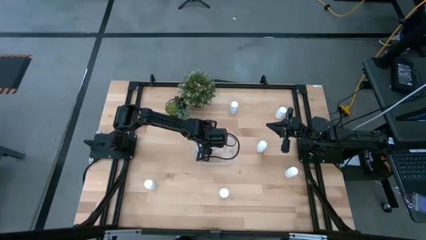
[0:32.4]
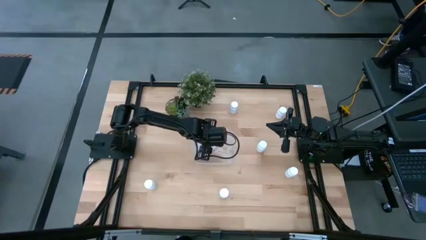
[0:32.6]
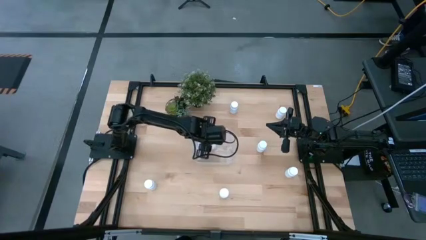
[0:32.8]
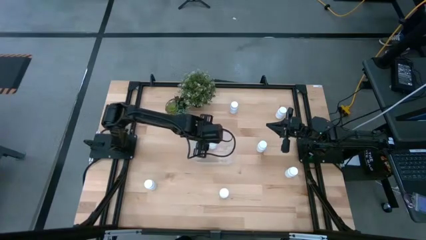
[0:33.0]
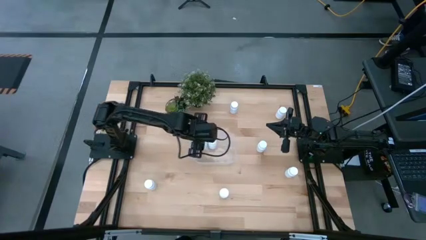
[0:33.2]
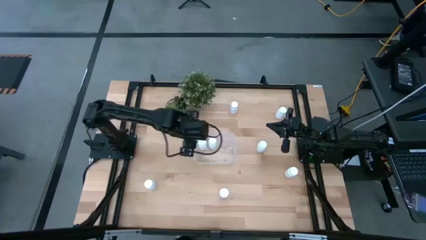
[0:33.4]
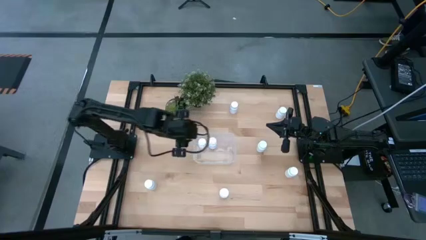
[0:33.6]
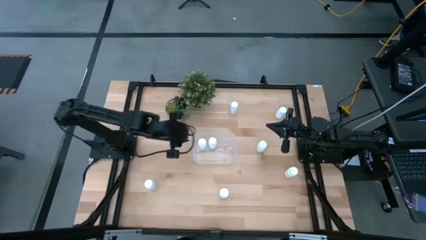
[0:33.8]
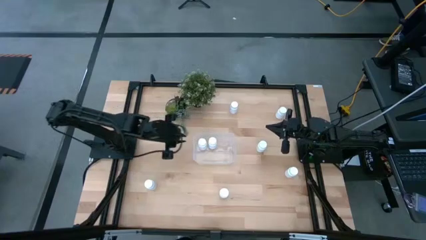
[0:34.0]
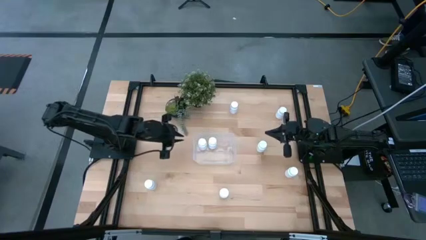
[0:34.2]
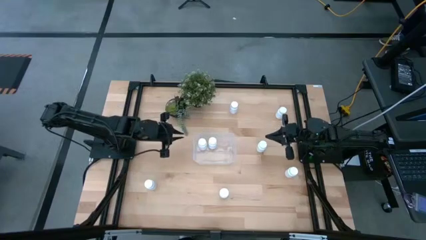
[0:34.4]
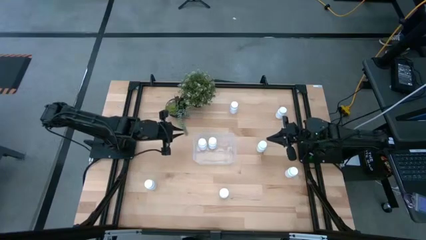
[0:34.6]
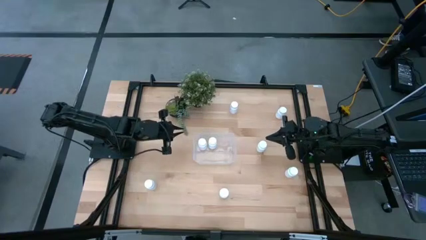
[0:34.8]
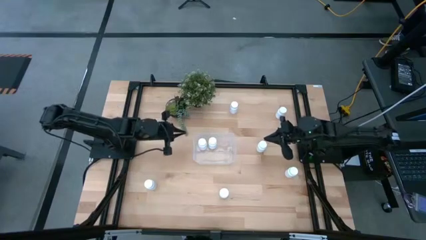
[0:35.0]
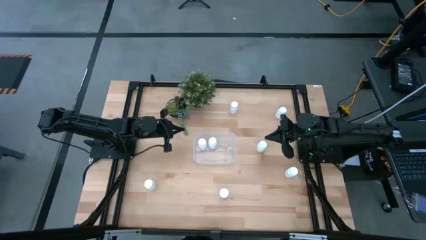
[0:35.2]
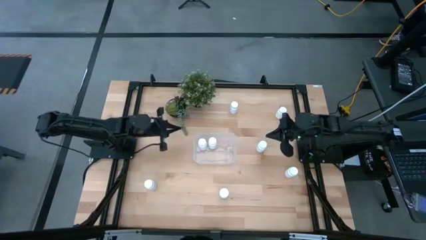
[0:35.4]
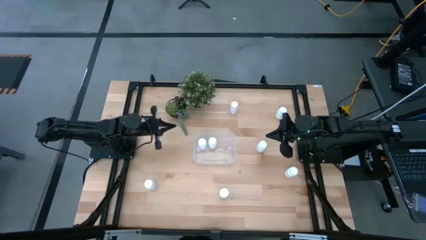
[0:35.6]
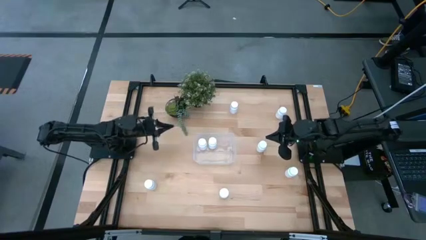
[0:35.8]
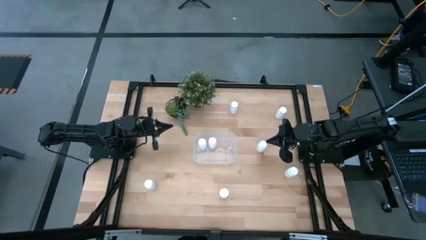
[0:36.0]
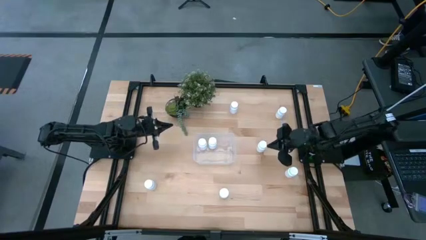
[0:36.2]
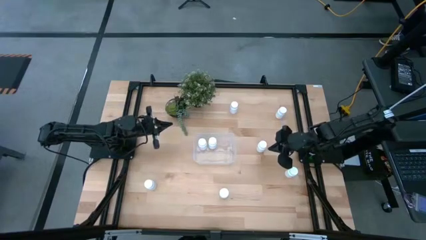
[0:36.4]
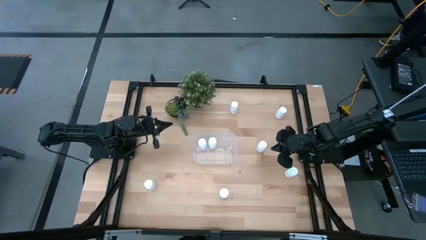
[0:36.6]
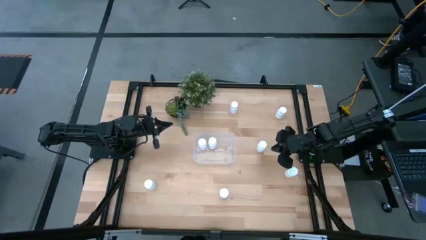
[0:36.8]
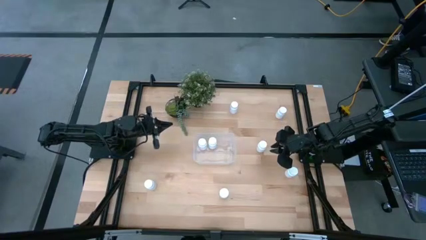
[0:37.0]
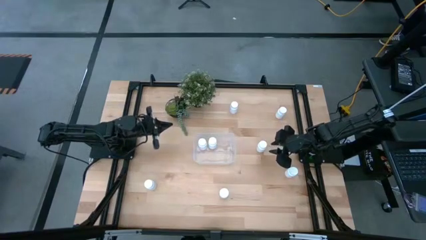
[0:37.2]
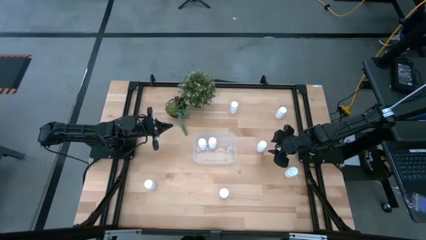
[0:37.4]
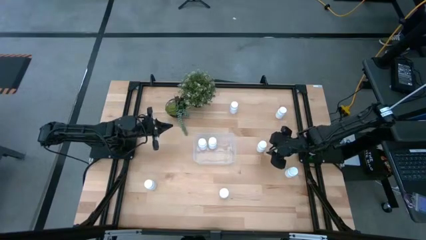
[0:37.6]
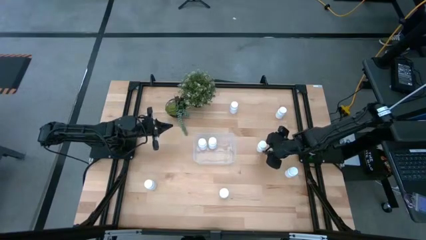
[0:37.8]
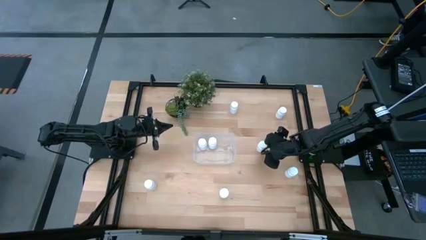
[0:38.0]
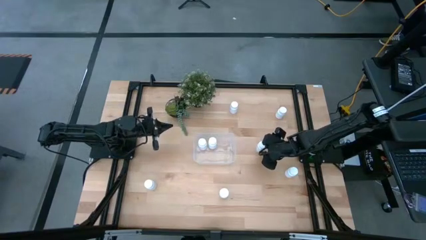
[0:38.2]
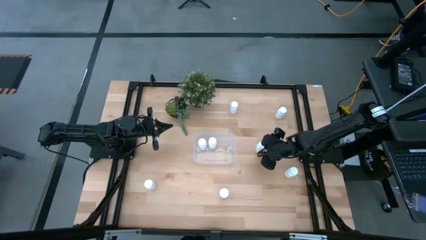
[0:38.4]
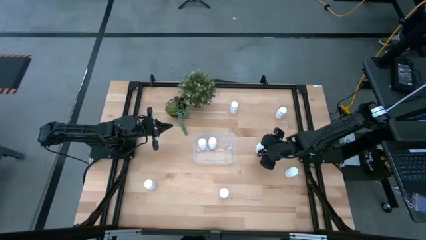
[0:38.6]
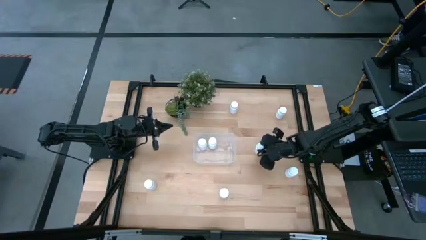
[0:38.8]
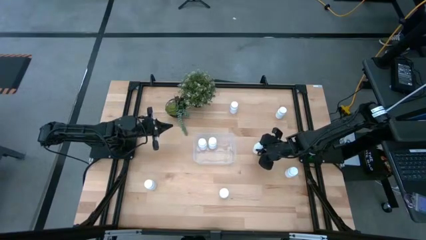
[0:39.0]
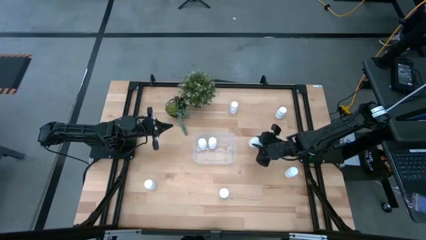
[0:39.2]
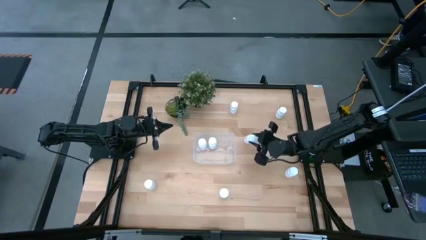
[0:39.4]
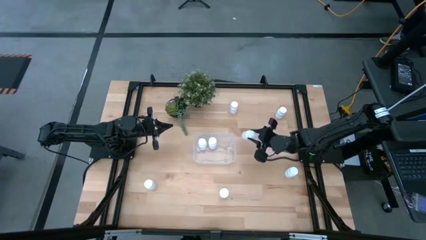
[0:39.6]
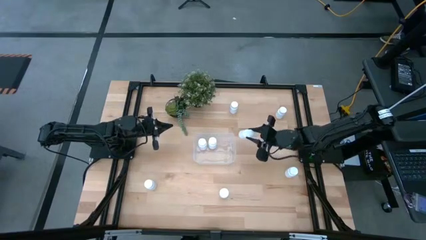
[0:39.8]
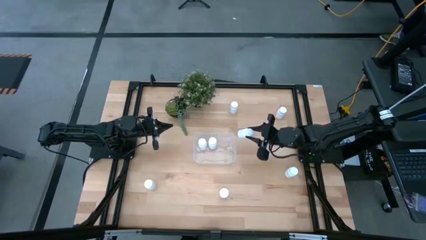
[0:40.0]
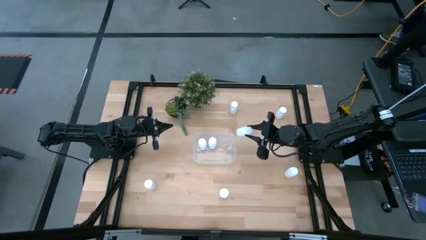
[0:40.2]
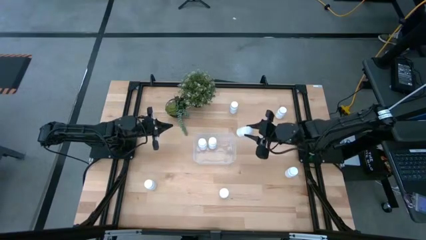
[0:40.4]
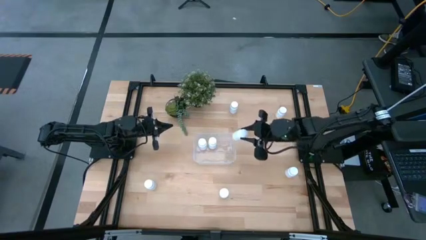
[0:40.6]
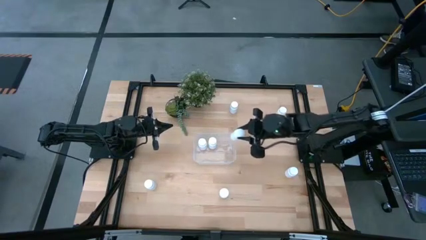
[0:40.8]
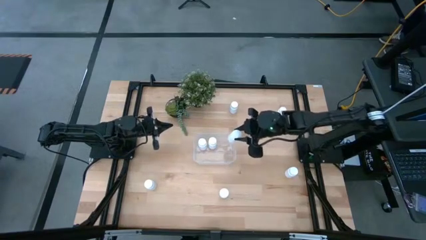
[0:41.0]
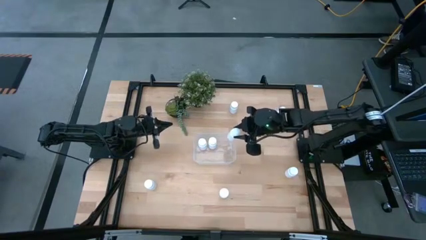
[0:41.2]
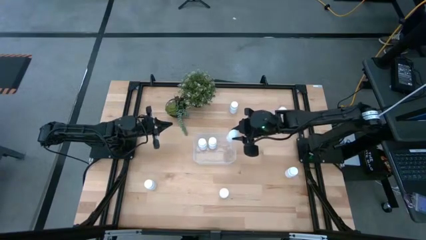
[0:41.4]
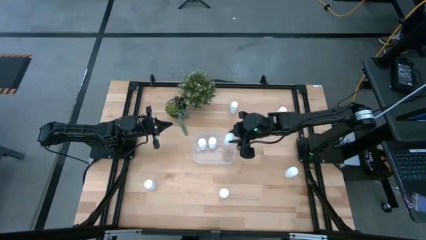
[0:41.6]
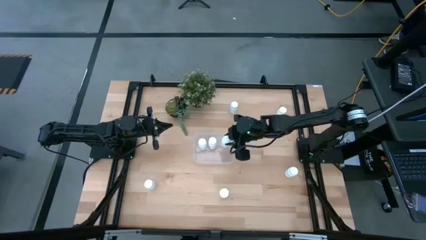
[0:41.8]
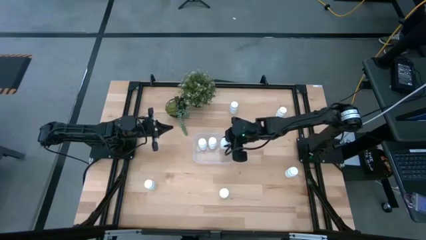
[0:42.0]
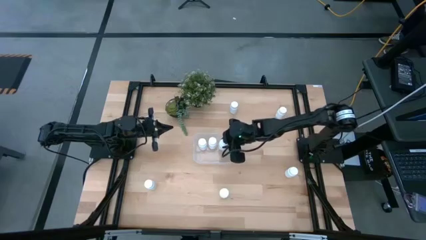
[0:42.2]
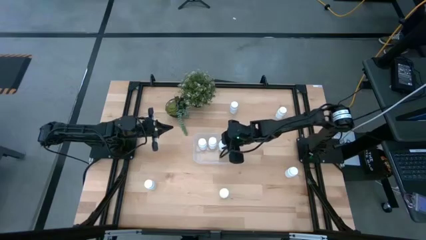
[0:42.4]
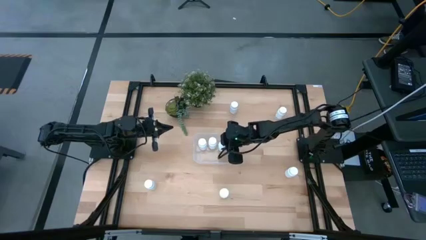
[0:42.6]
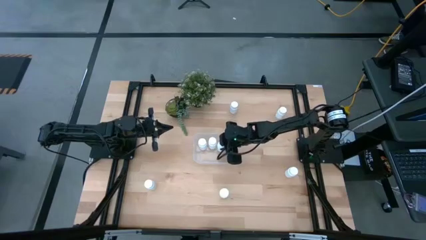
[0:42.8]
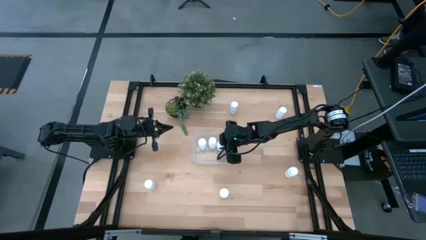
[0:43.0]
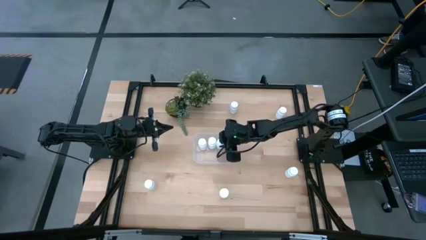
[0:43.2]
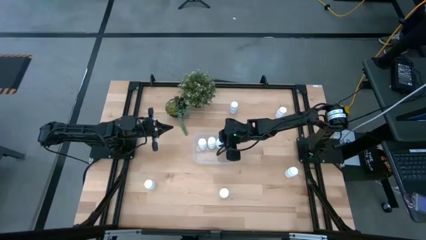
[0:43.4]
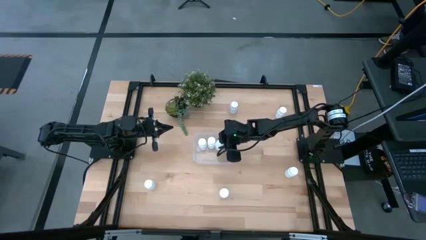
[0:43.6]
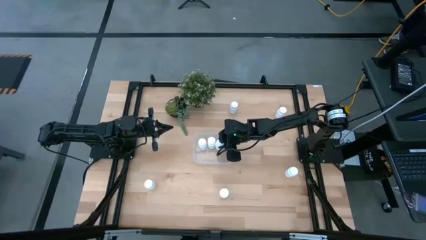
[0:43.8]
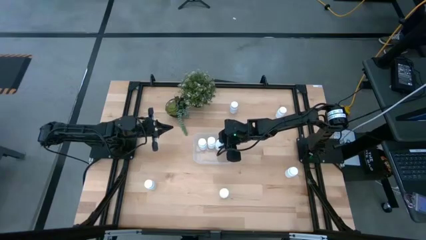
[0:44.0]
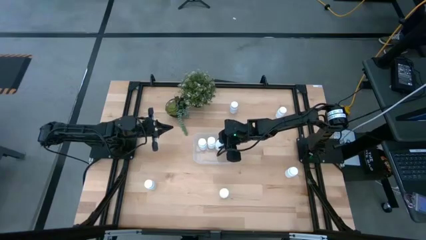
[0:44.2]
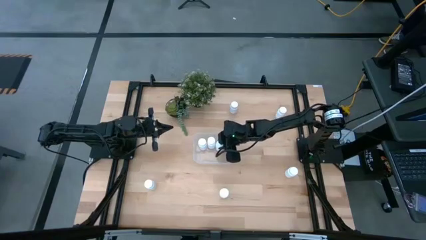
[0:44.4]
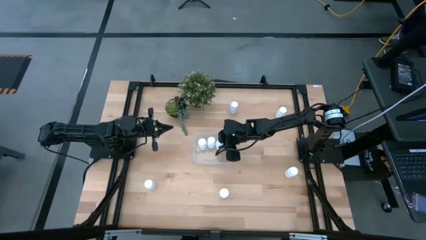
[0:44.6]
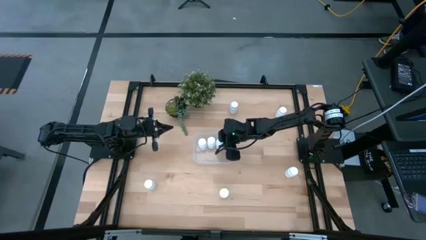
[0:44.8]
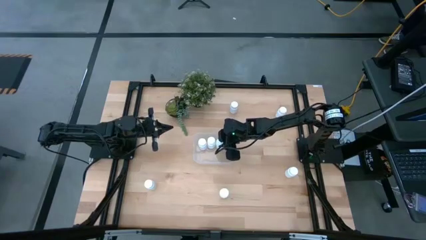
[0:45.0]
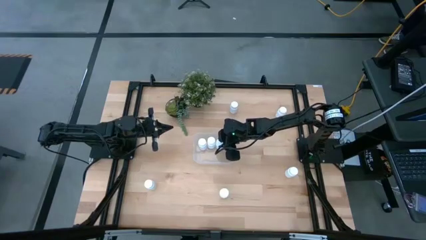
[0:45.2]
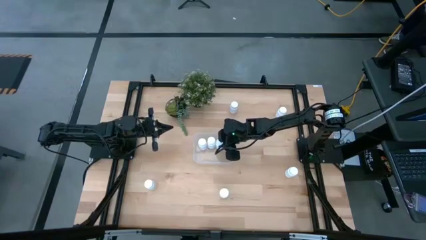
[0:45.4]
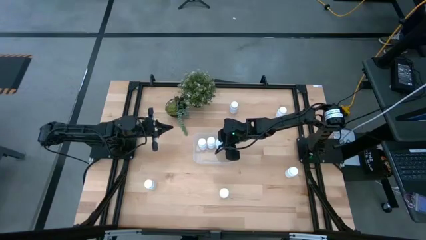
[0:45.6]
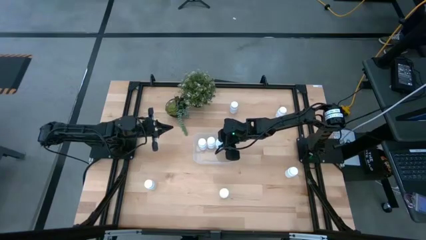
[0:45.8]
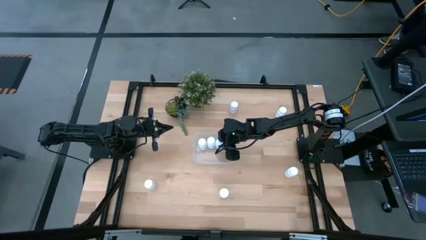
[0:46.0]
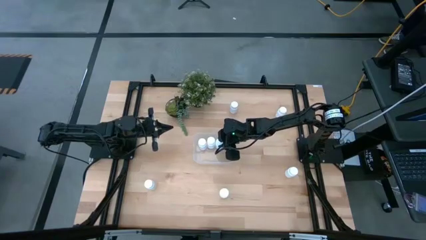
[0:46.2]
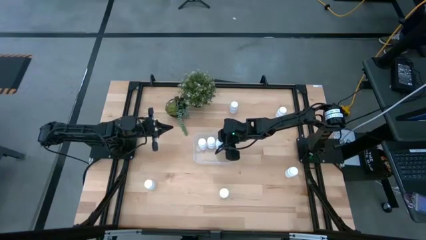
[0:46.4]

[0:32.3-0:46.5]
Task: Pick and place pill bottles into a basket
Put the pill bottle into the bin
